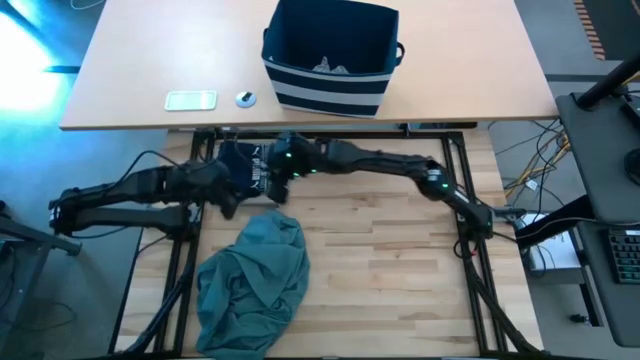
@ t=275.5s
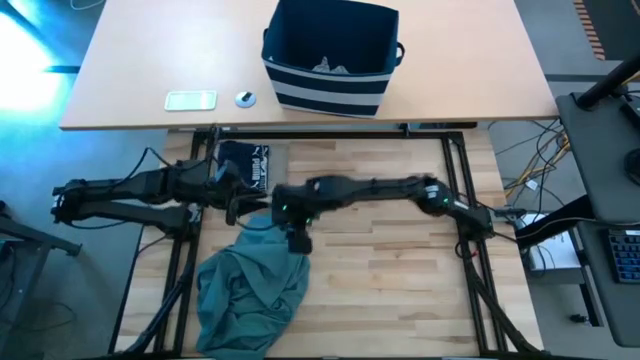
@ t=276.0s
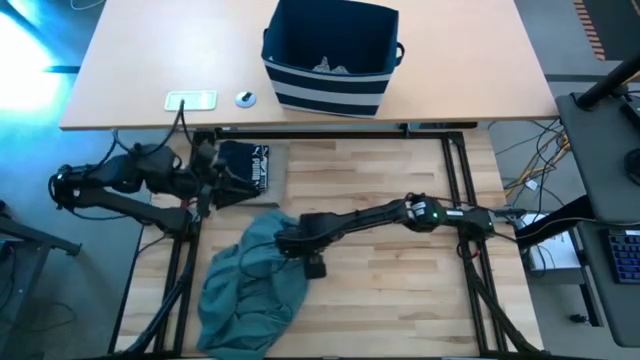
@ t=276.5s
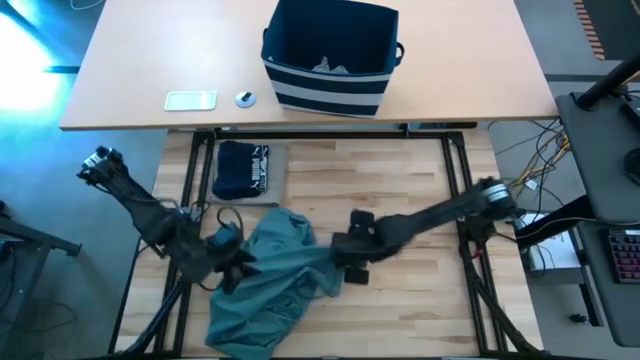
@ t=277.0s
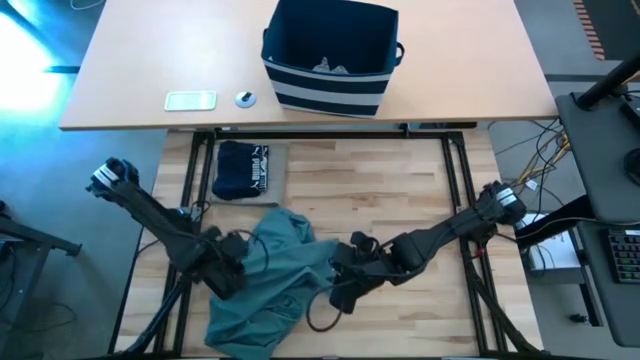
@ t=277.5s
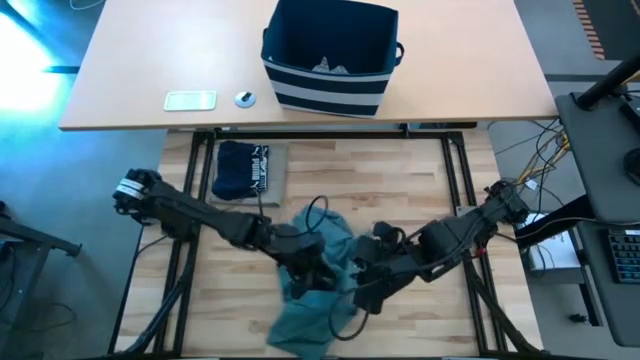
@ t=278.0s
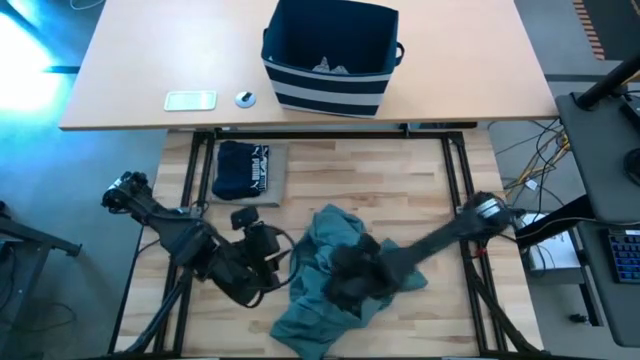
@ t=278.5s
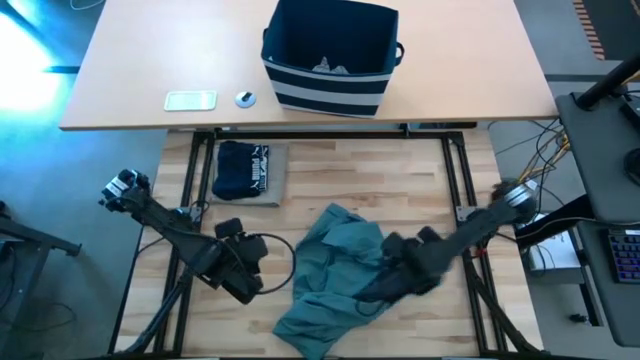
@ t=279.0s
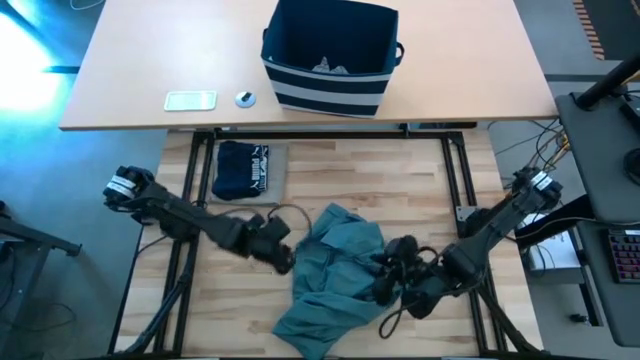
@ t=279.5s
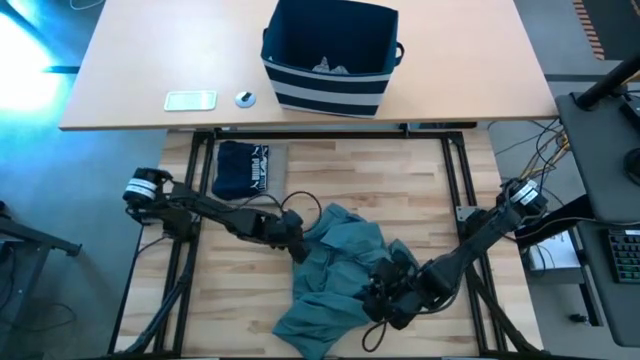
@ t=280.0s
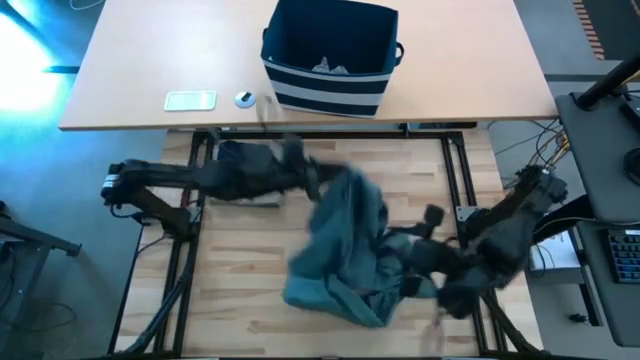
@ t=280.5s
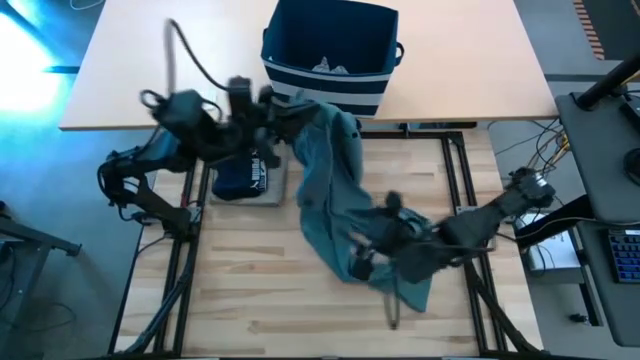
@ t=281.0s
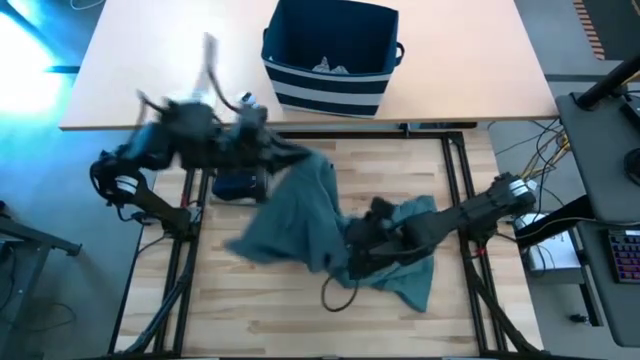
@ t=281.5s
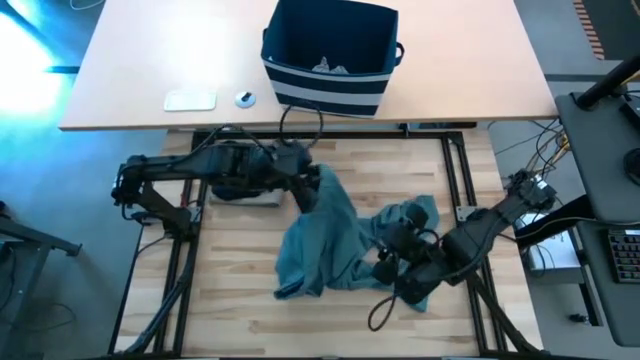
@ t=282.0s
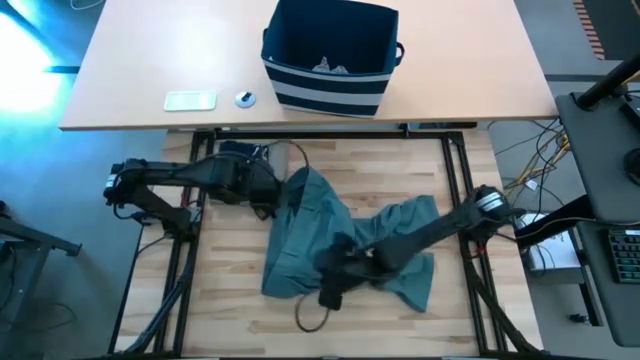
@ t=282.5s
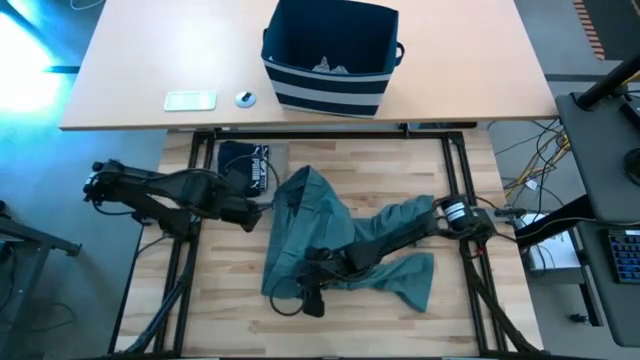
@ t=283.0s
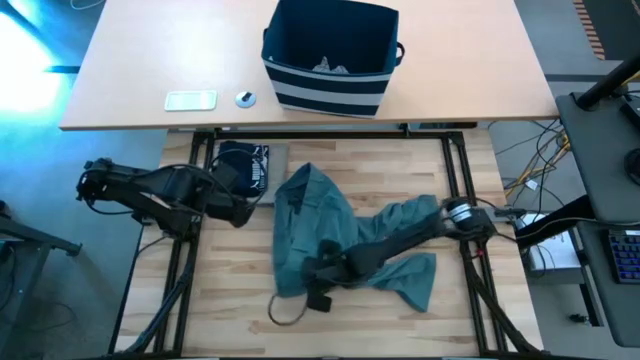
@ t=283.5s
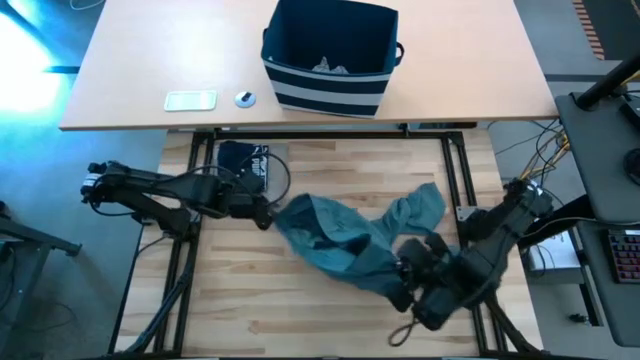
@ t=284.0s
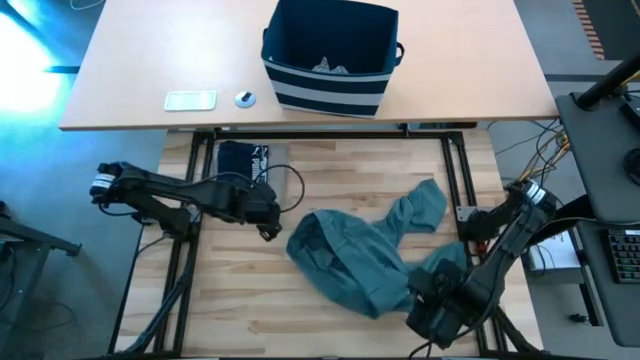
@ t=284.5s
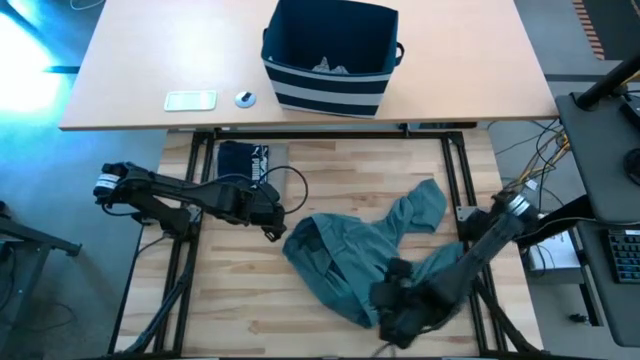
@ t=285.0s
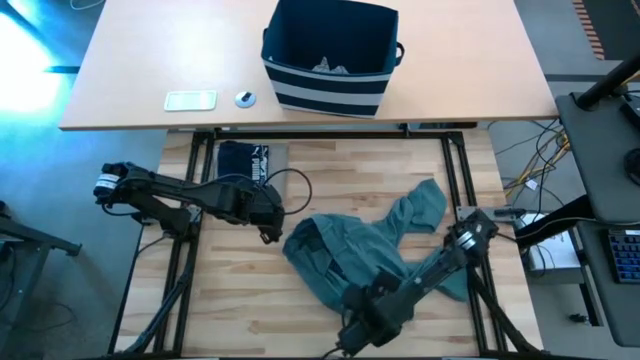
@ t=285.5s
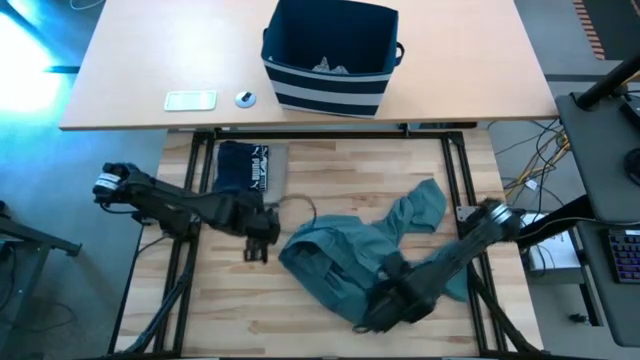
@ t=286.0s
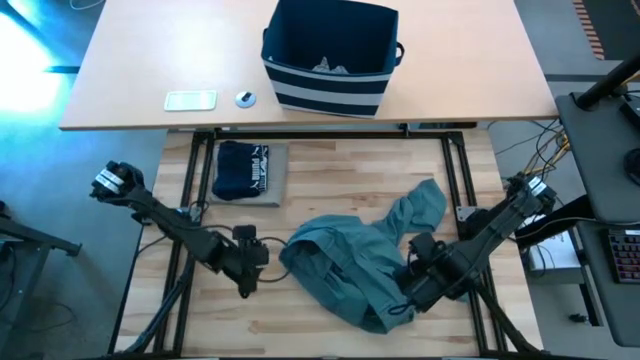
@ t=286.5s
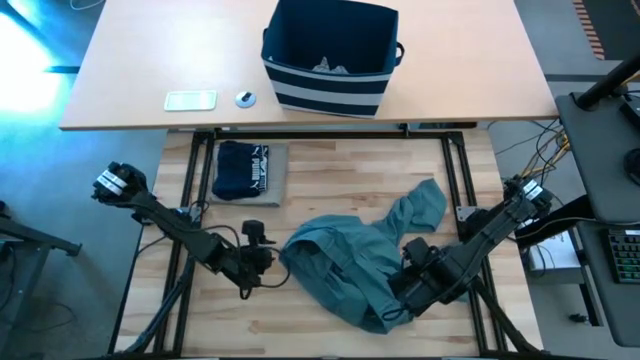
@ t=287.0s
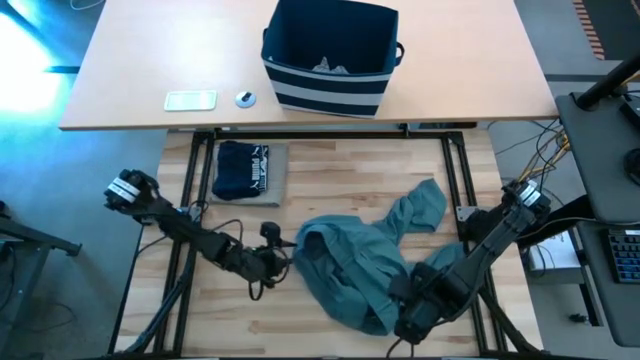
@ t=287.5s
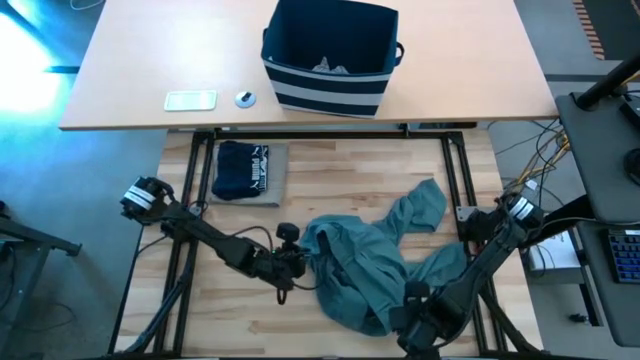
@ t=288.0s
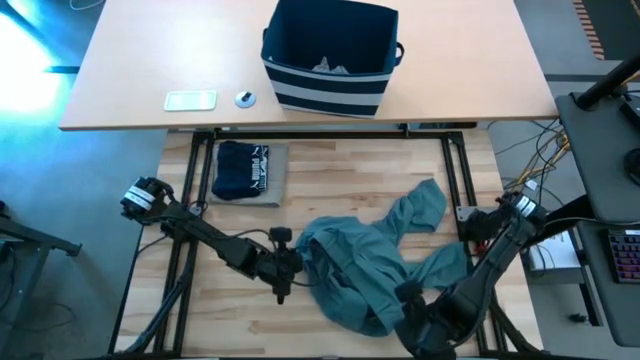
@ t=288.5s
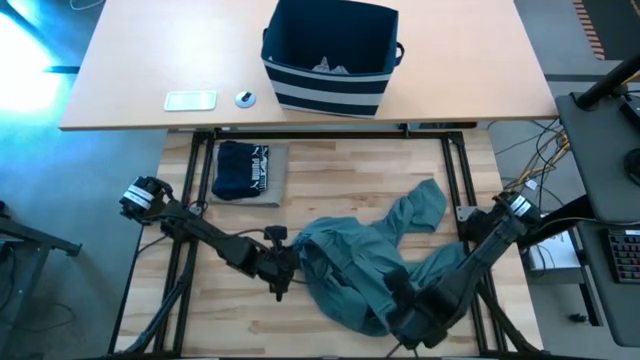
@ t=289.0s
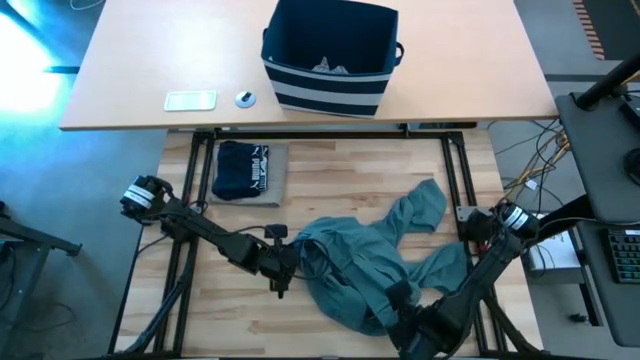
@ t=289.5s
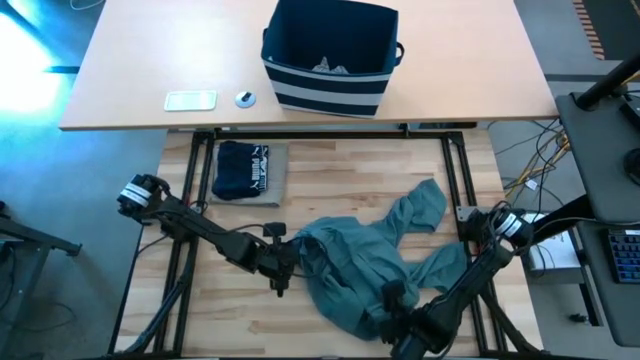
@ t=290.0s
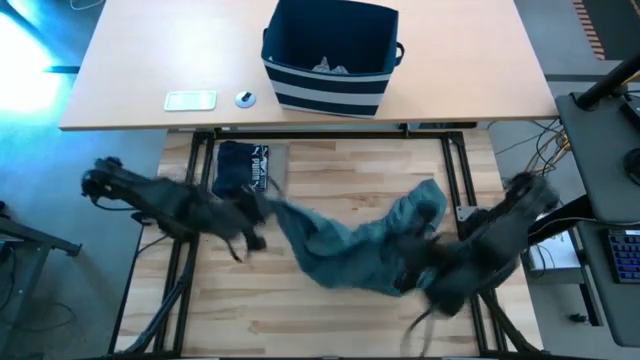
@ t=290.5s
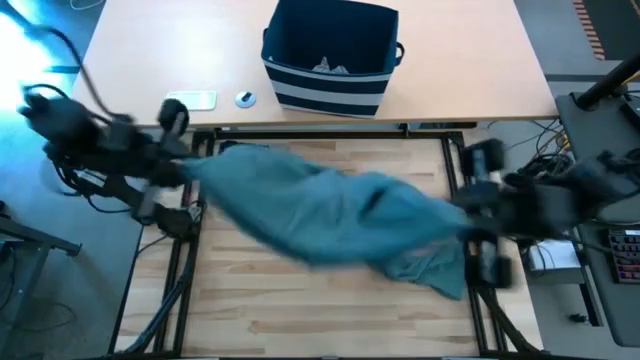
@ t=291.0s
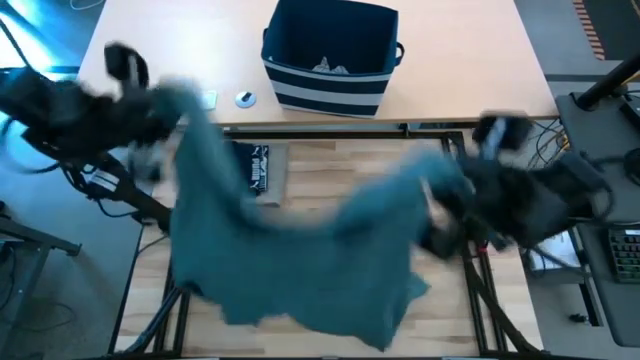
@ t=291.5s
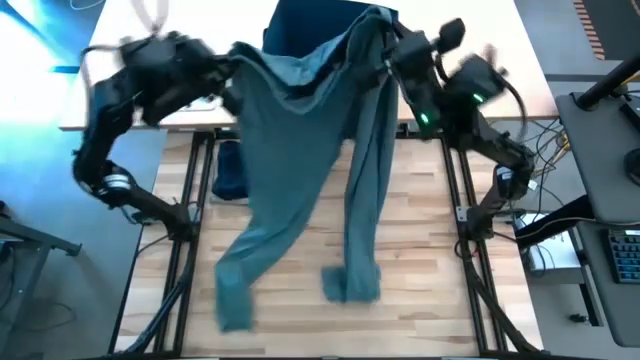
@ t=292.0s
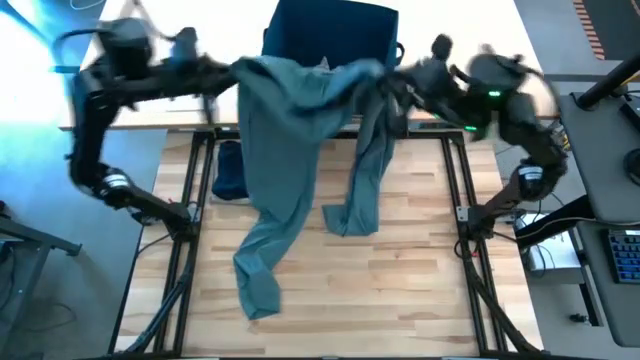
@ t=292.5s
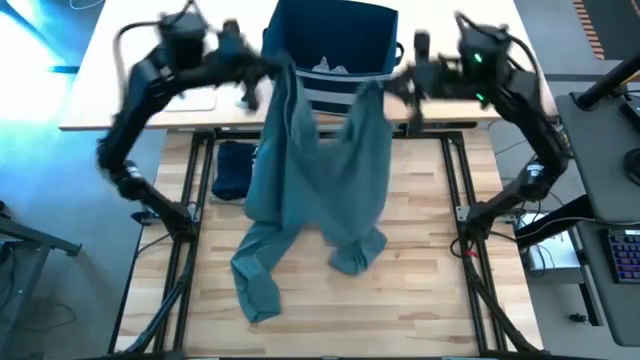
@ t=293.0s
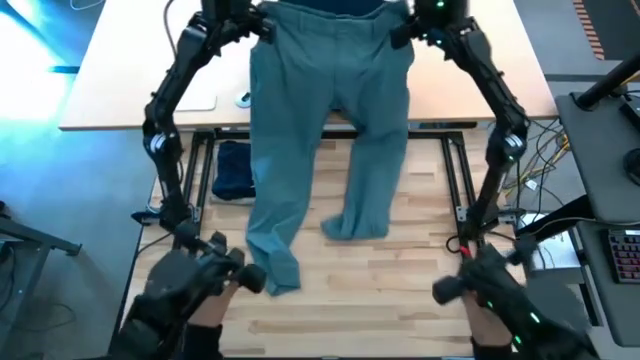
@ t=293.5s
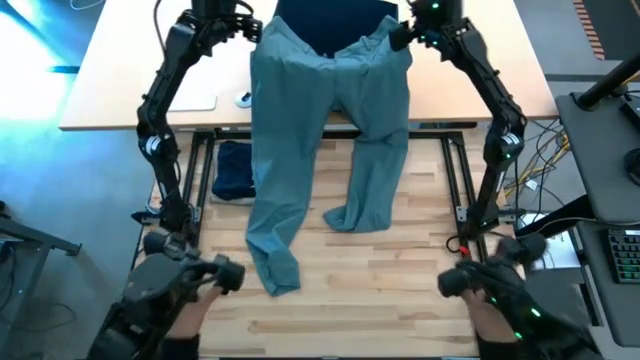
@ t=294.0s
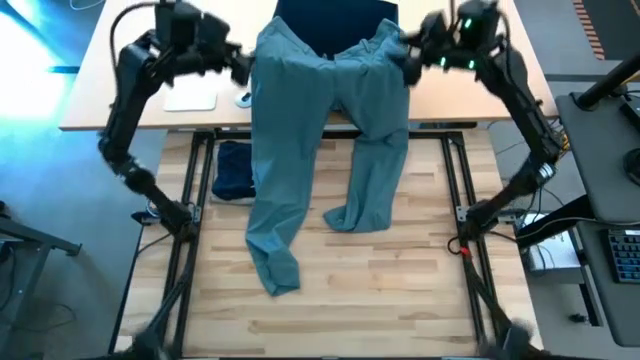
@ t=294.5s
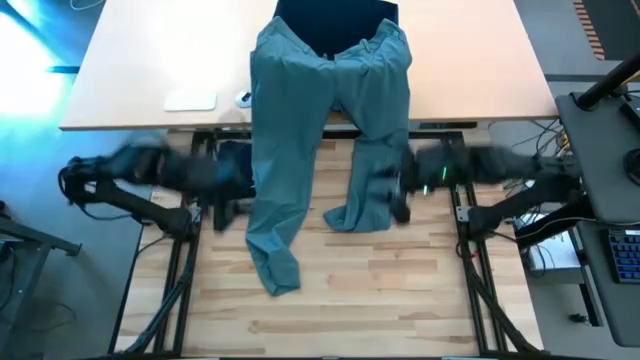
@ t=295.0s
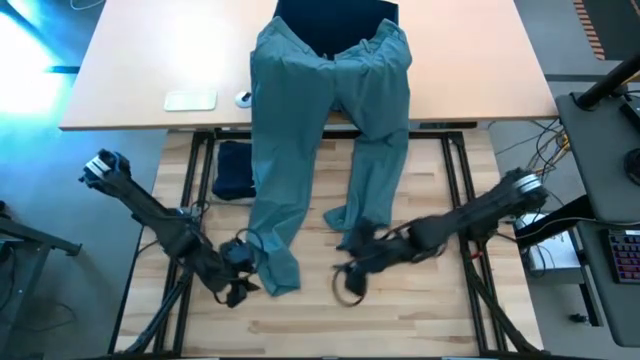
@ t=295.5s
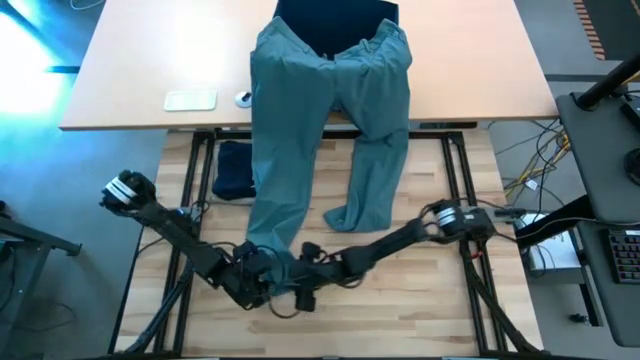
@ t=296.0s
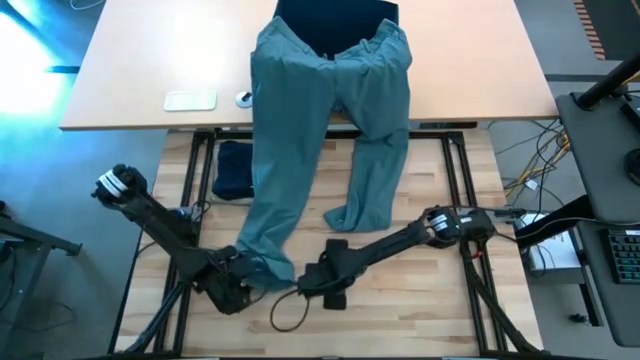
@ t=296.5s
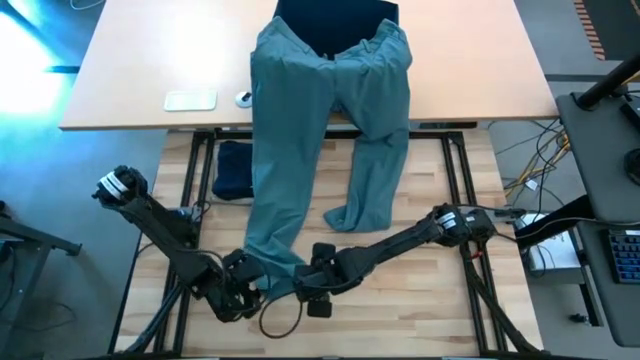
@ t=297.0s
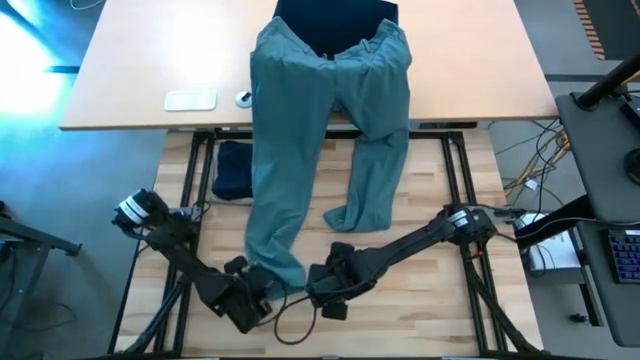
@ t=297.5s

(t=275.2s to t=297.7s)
Task: Fold Laundry from Bin
Fold the gray pants
